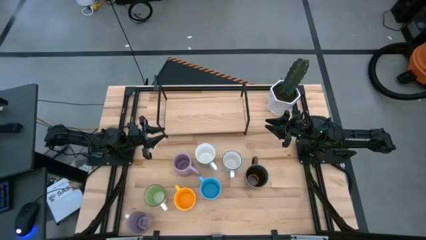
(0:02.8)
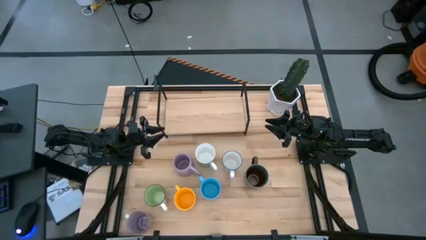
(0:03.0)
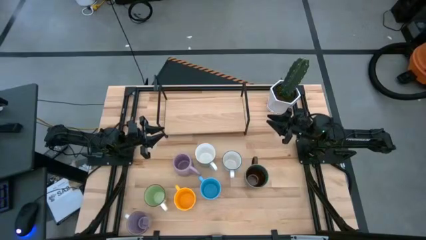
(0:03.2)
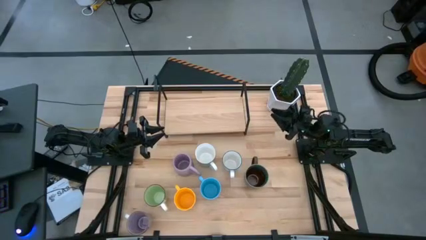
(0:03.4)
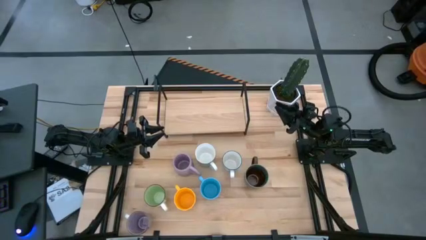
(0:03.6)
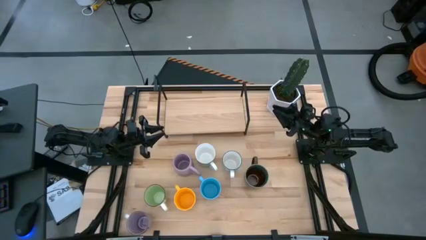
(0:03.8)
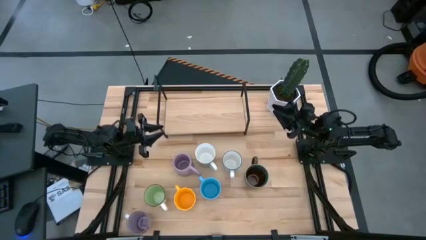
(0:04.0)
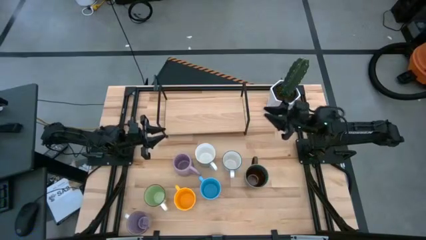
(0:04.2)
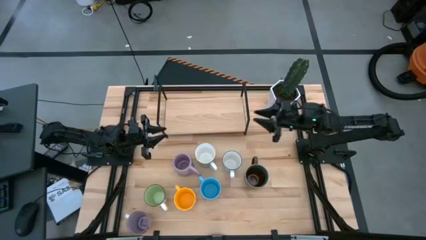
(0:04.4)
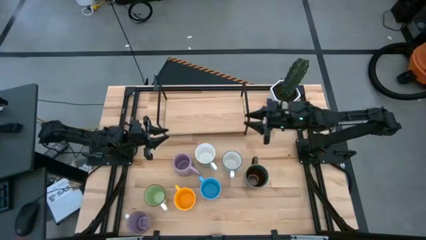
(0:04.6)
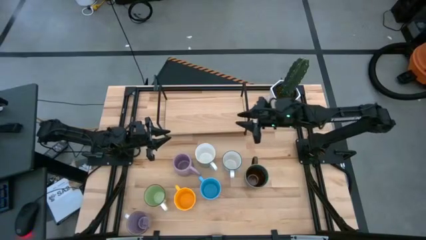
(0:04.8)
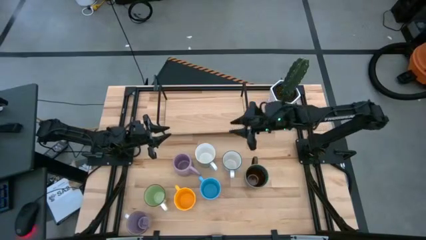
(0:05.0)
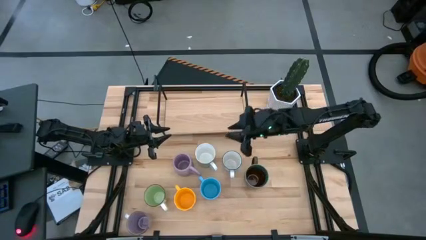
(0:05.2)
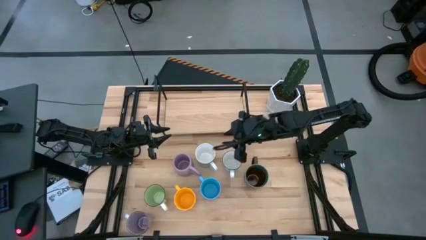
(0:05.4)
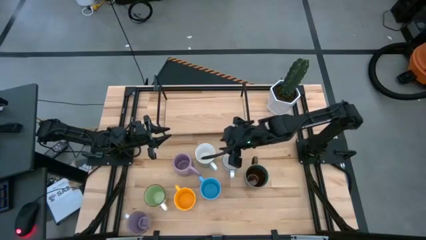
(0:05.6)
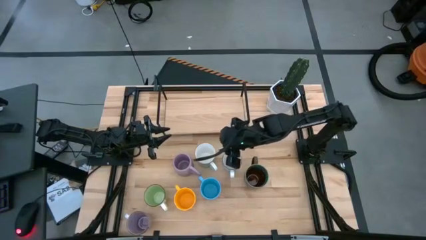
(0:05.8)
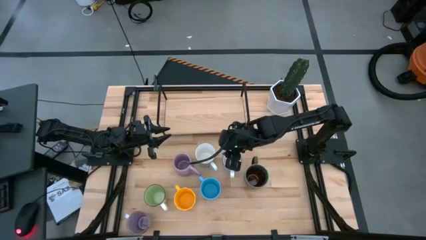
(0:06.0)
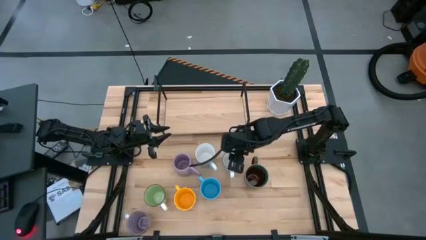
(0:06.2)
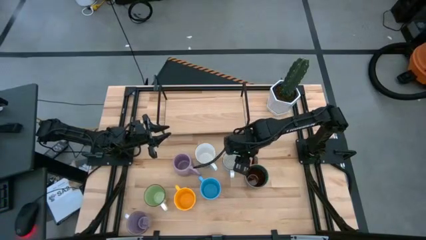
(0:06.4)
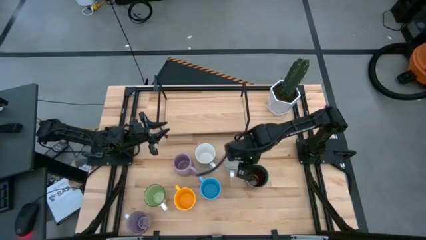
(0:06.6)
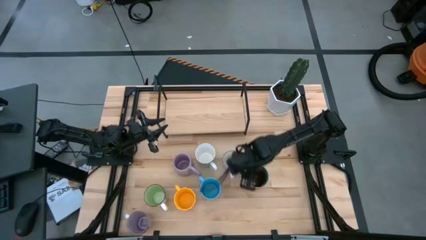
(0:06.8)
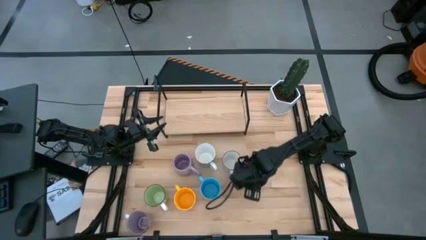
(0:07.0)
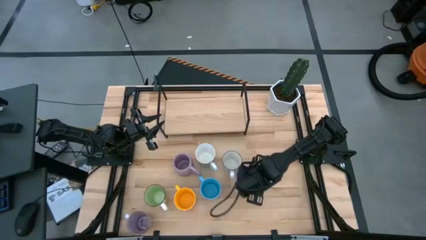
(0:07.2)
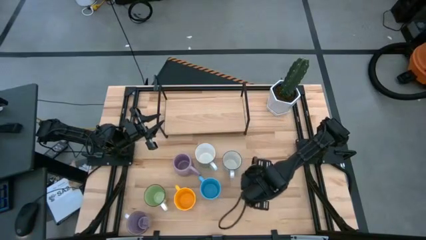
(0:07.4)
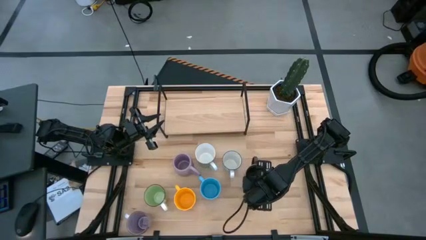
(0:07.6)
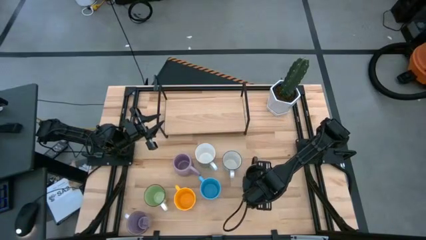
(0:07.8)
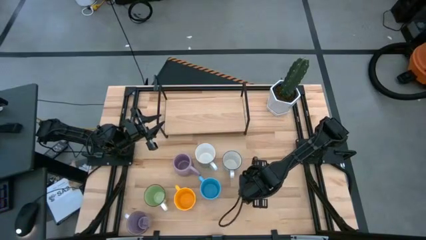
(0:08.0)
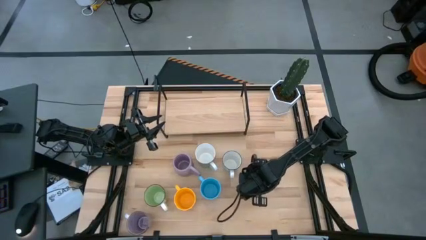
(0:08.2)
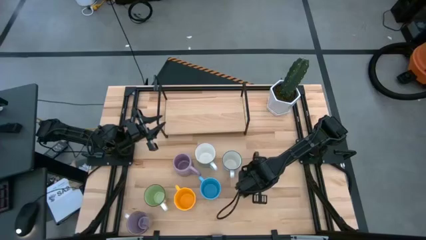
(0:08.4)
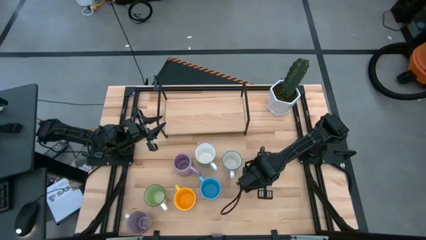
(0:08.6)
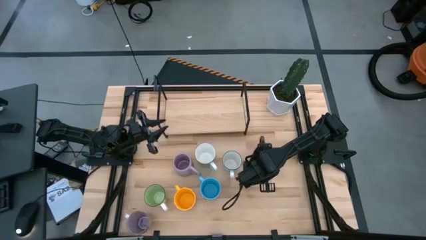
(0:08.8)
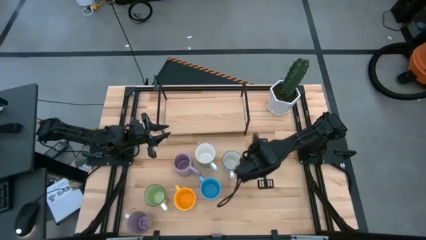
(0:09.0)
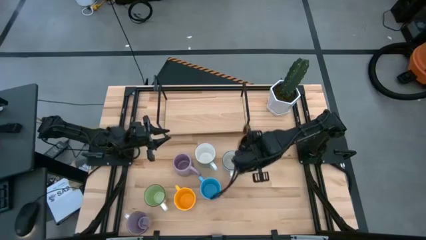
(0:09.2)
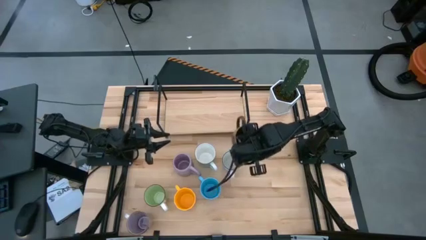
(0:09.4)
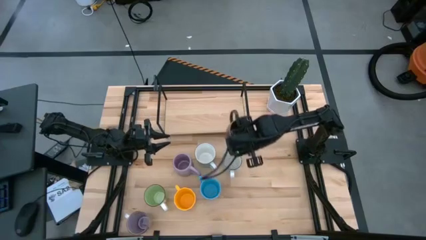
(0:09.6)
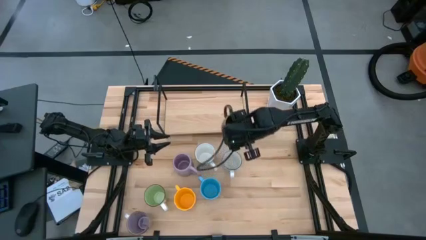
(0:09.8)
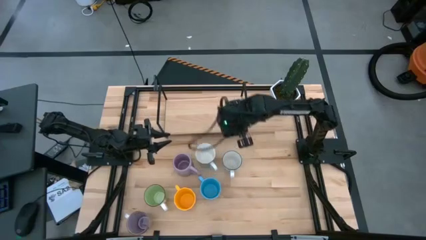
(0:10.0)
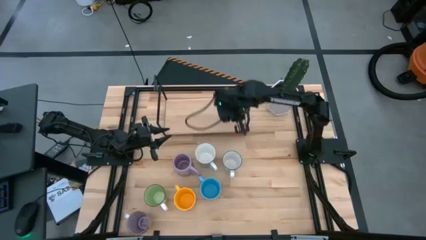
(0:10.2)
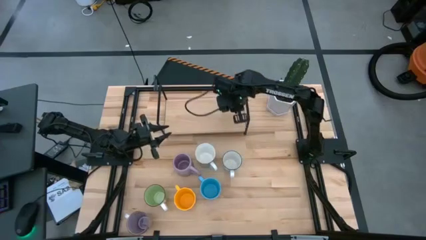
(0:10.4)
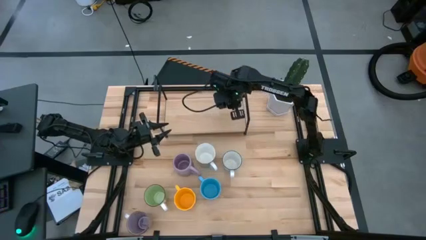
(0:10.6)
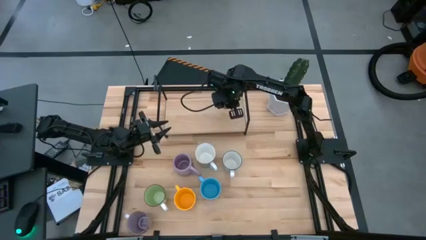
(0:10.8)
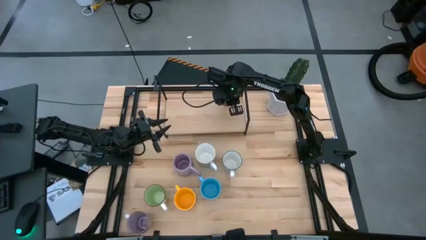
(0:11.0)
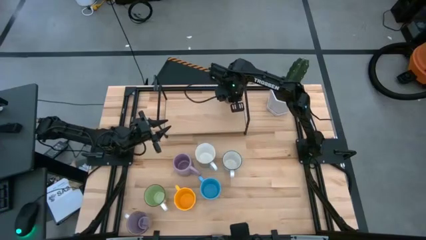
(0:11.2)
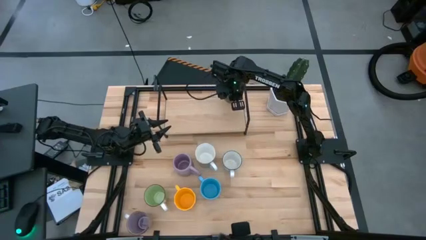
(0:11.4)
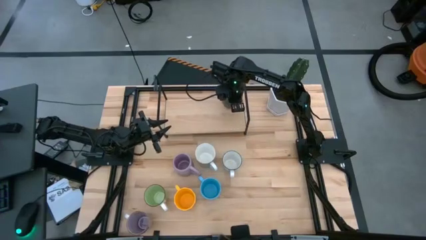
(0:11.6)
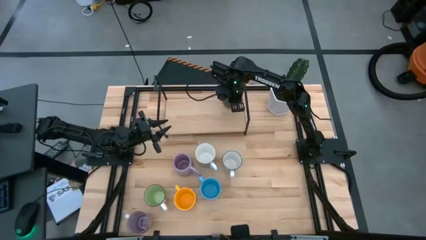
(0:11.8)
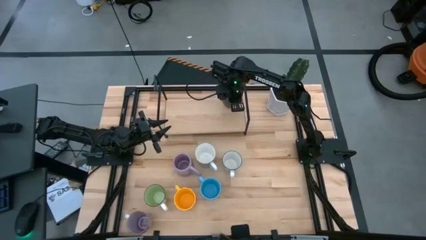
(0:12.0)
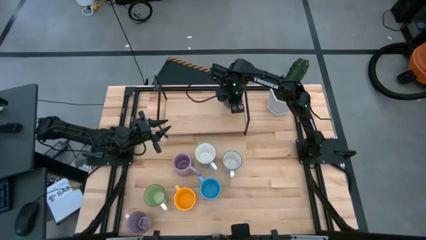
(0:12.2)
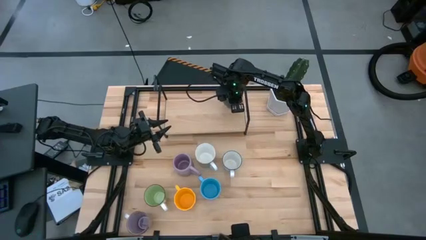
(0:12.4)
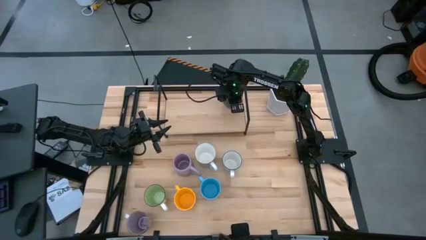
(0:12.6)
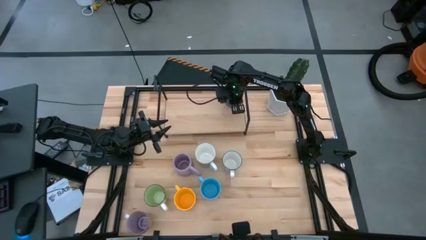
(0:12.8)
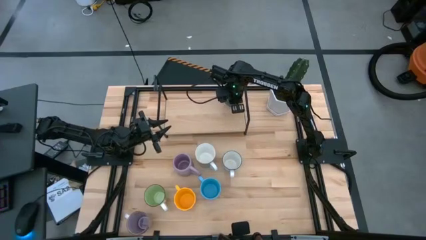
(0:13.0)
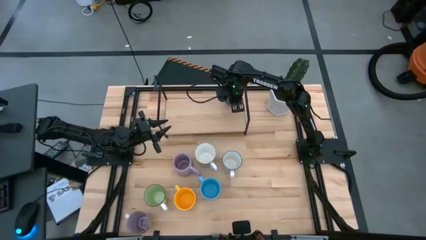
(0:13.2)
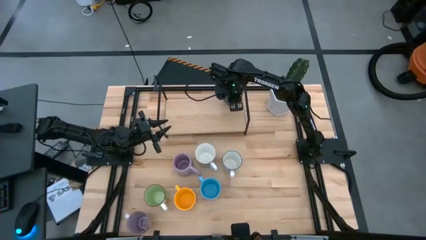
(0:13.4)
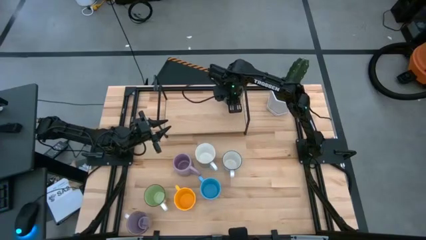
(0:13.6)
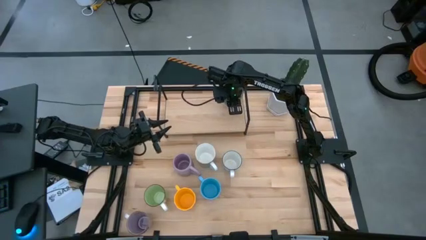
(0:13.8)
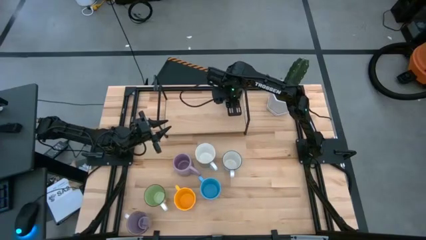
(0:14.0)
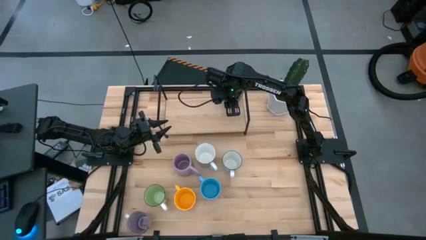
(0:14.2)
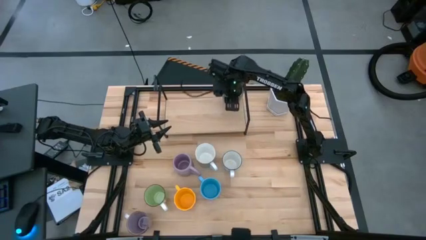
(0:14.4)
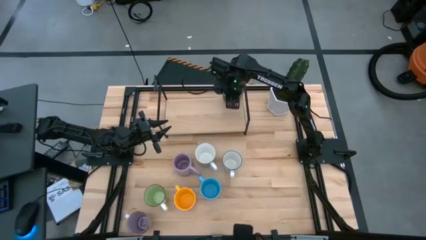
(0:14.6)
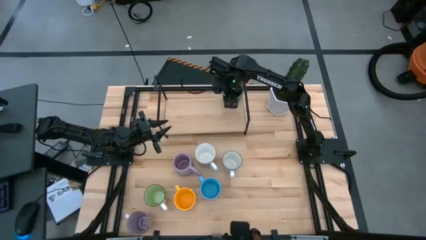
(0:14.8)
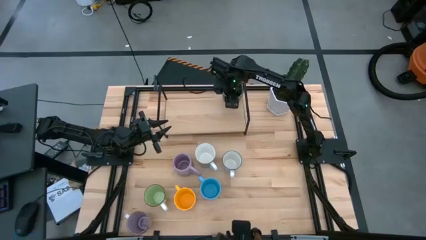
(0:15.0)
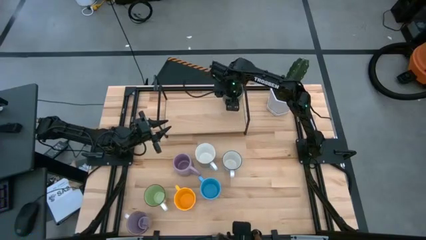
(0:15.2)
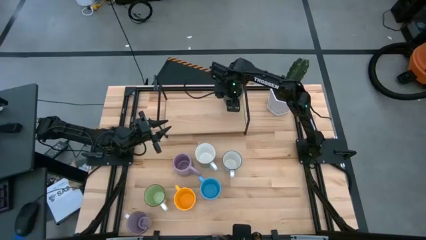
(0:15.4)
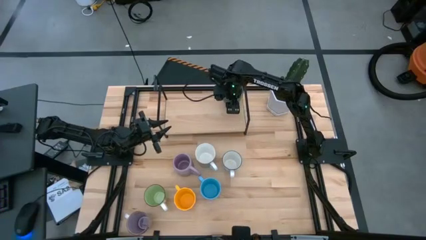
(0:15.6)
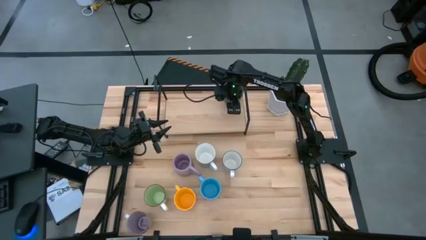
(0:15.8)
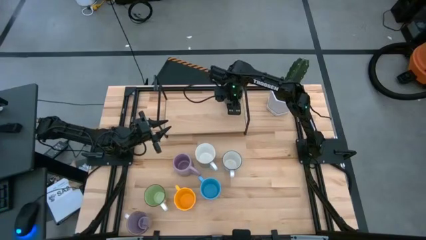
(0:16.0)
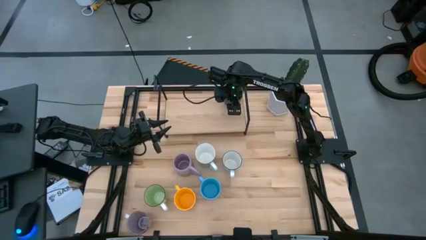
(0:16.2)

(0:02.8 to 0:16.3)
Task: Place coffee mugs
Put the blue patterned mug on the shelf

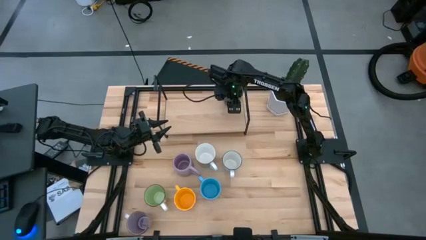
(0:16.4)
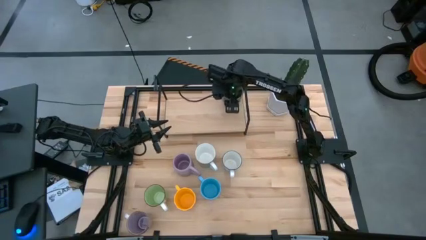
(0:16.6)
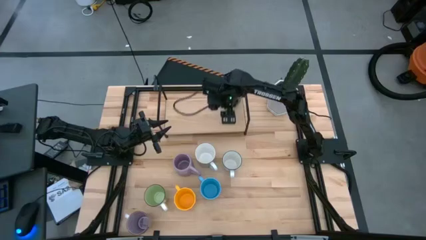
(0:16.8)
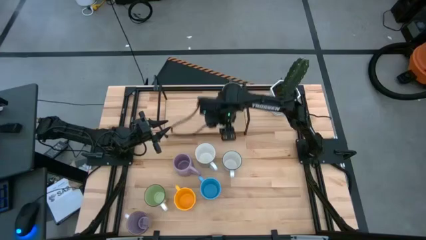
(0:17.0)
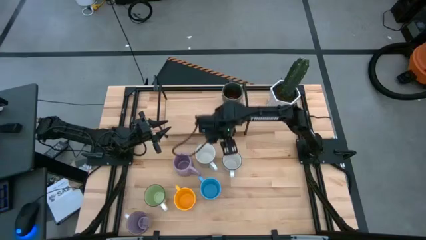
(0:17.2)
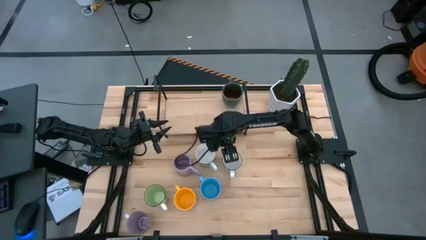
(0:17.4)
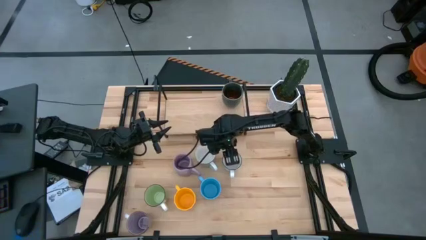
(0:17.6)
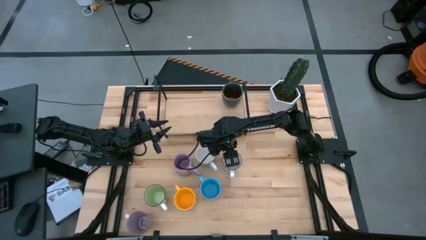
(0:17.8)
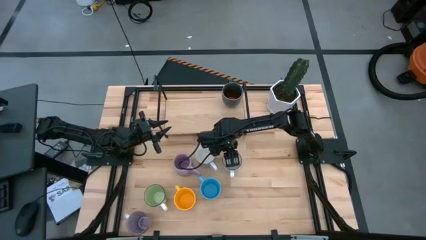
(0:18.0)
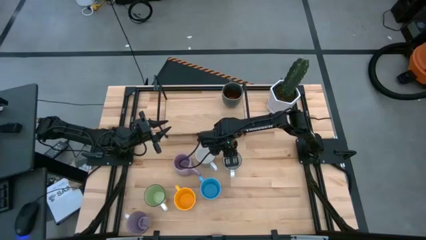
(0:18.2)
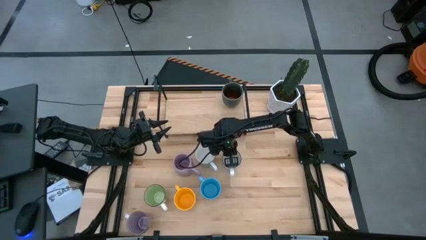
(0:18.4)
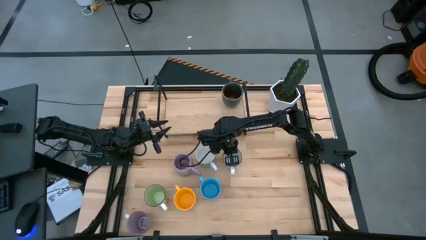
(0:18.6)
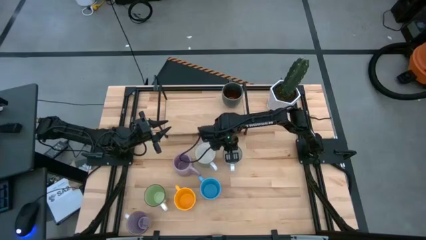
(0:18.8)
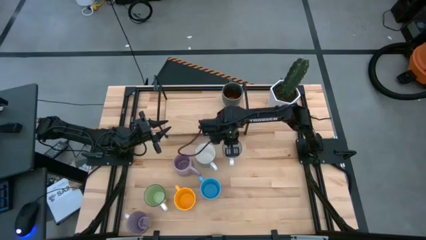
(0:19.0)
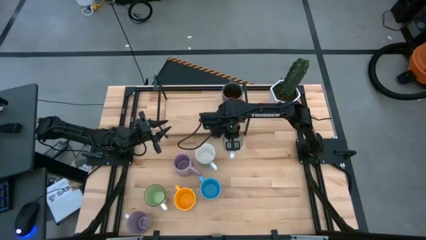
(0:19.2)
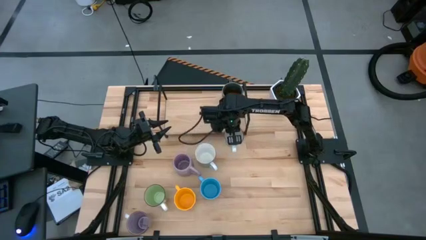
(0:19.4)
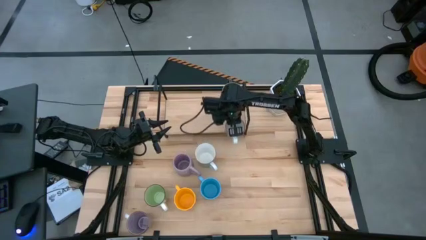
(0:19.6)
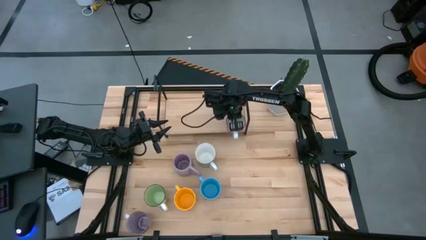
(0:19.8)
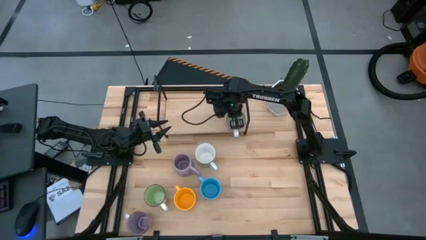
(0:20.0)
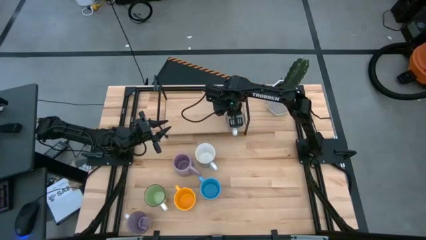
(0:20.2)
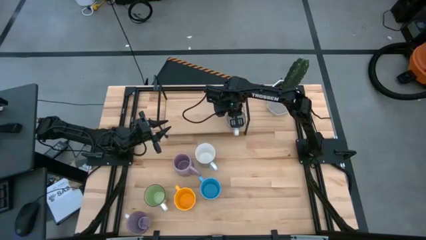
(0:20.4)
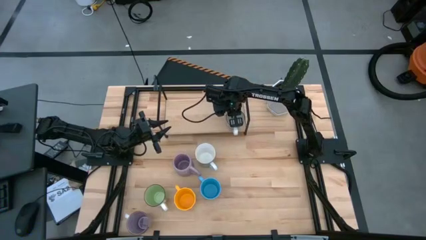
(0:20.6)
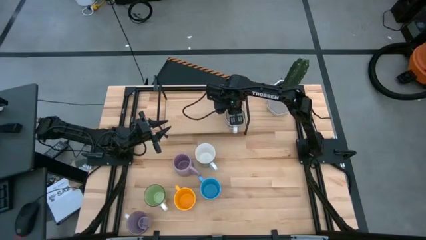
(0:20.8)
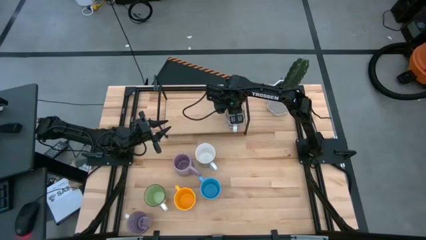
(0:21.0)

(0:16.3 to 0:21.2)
Put the blue white mug on the shelf
